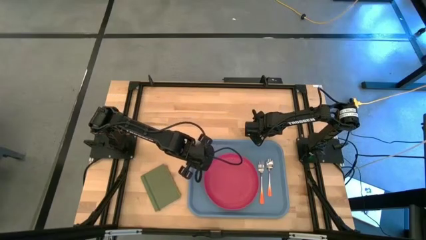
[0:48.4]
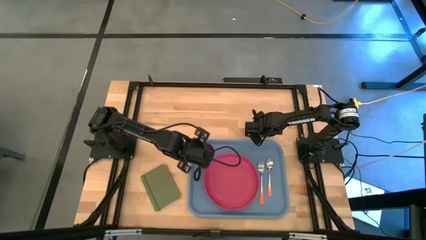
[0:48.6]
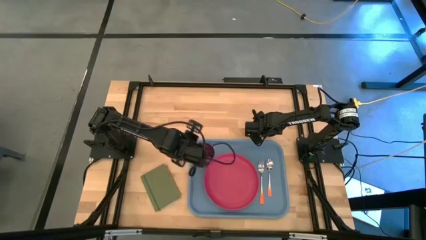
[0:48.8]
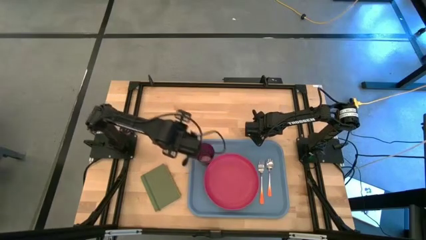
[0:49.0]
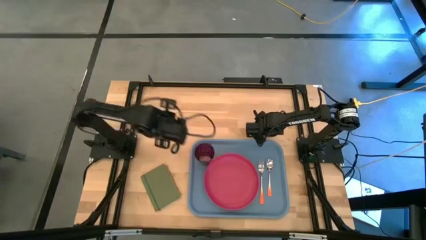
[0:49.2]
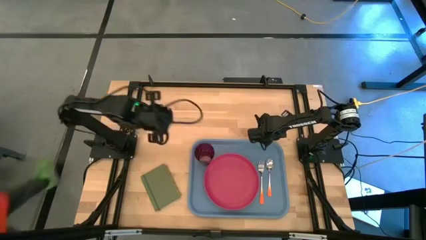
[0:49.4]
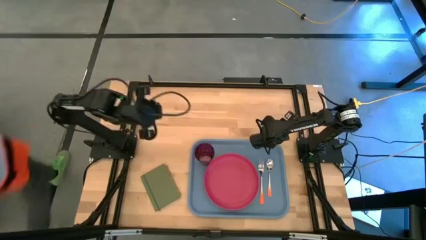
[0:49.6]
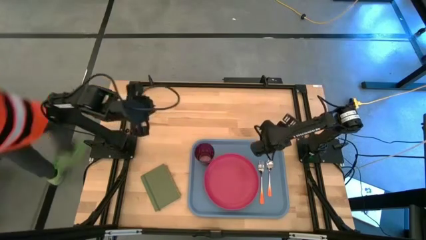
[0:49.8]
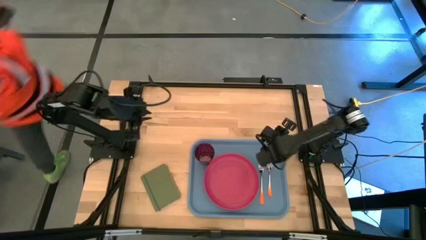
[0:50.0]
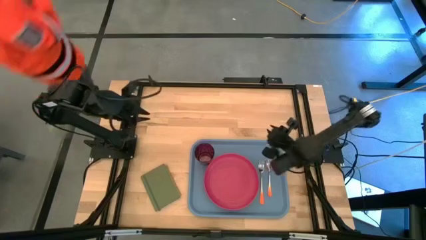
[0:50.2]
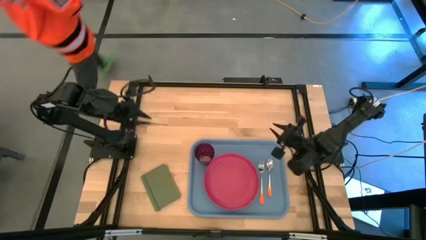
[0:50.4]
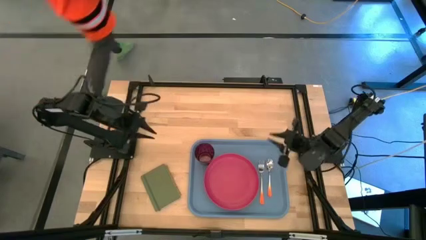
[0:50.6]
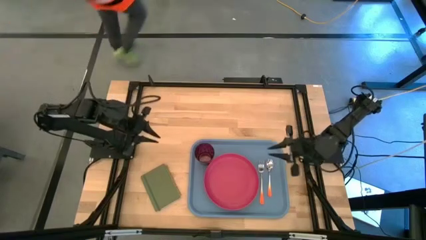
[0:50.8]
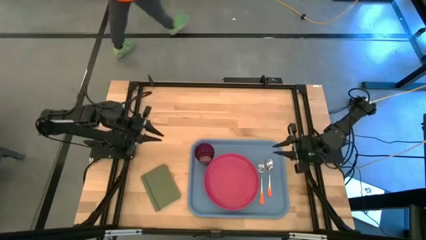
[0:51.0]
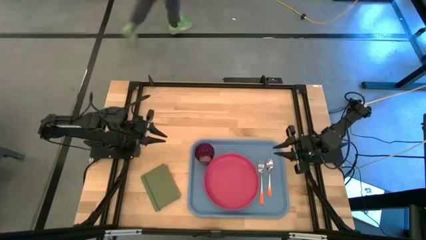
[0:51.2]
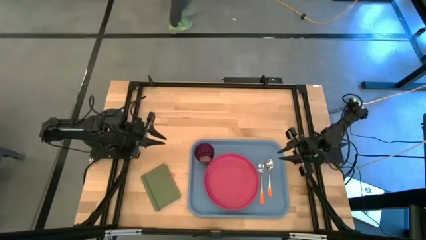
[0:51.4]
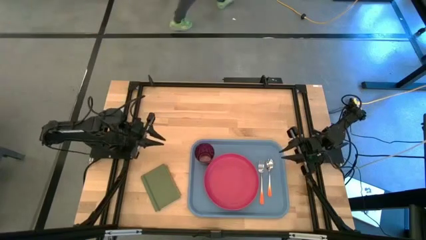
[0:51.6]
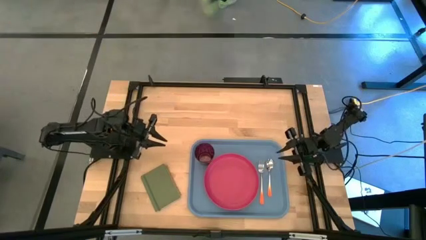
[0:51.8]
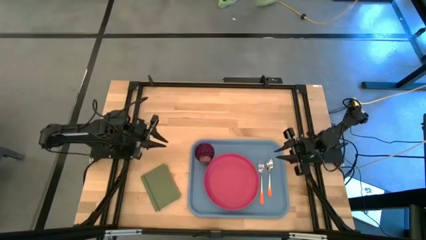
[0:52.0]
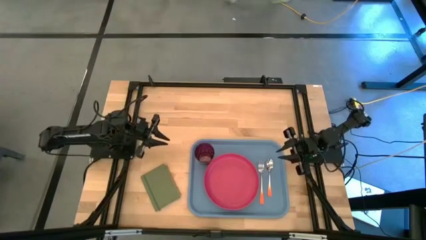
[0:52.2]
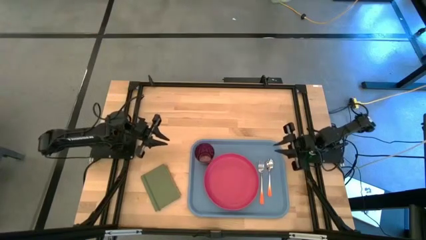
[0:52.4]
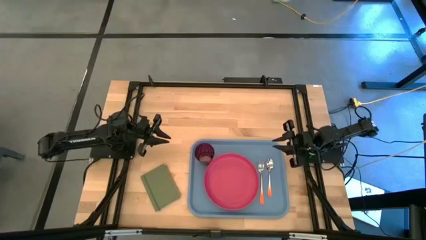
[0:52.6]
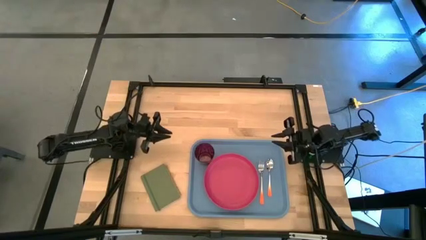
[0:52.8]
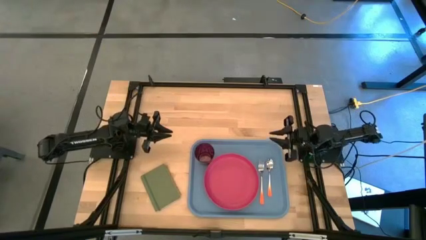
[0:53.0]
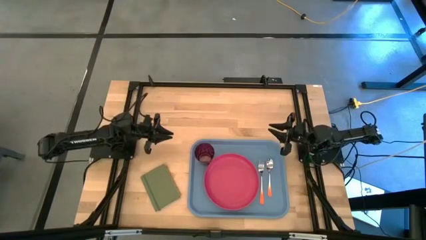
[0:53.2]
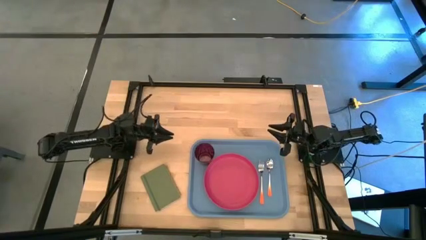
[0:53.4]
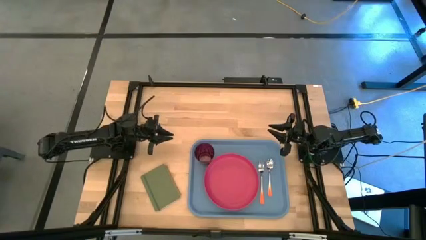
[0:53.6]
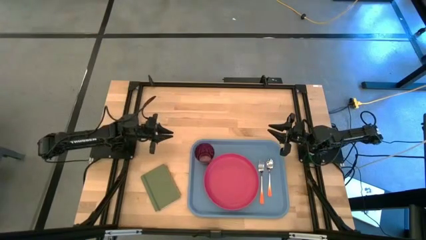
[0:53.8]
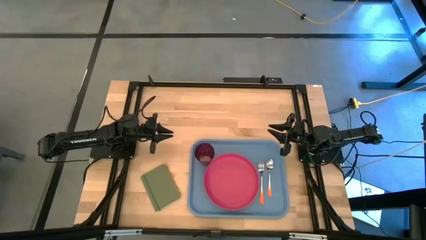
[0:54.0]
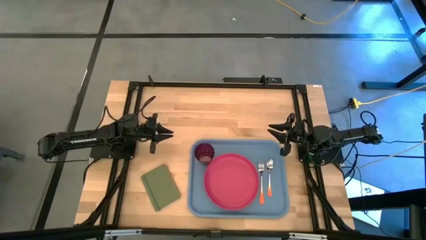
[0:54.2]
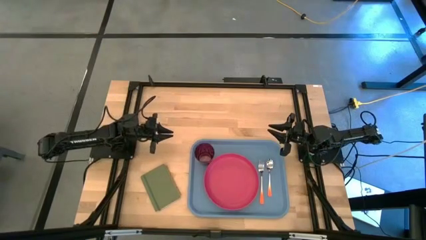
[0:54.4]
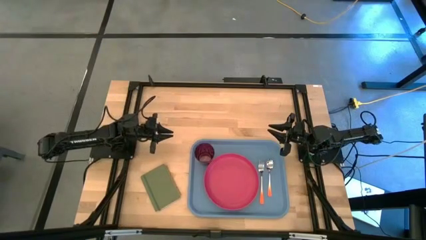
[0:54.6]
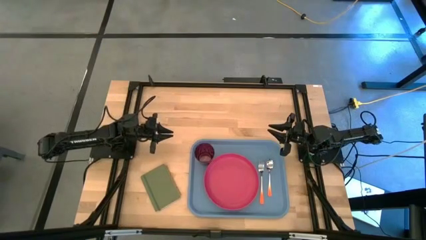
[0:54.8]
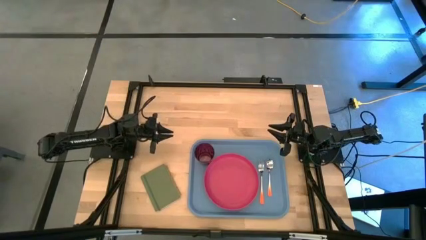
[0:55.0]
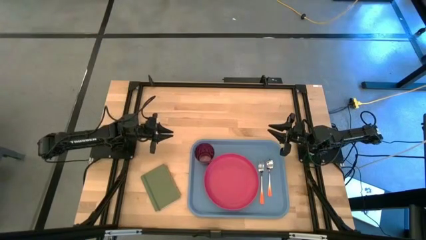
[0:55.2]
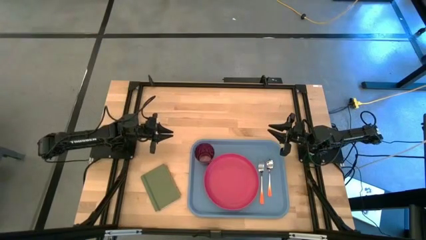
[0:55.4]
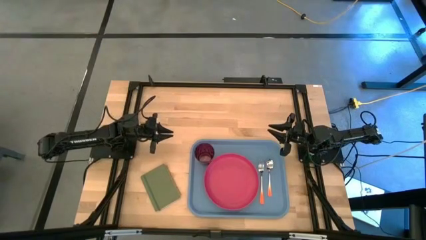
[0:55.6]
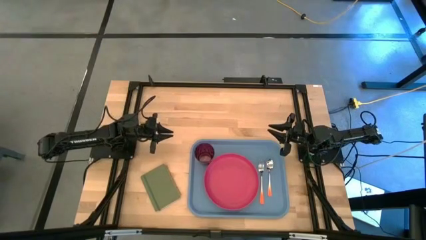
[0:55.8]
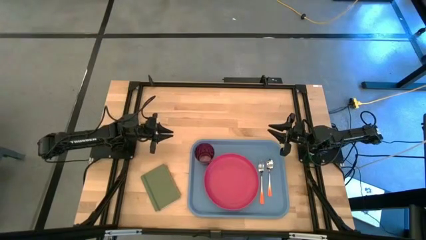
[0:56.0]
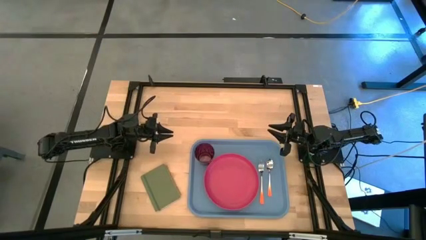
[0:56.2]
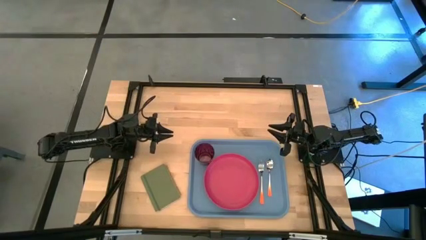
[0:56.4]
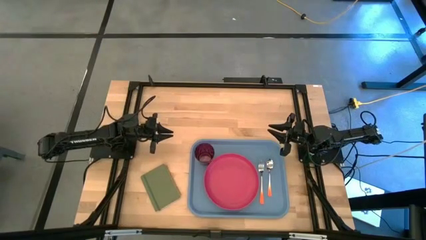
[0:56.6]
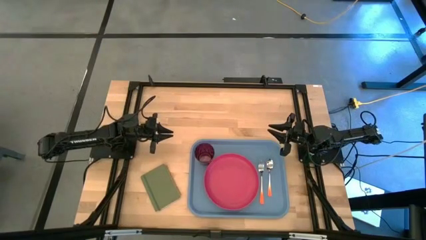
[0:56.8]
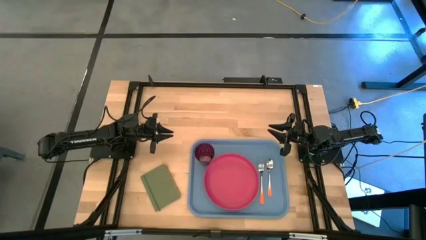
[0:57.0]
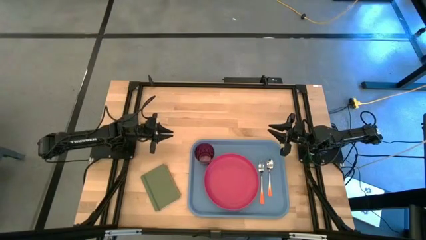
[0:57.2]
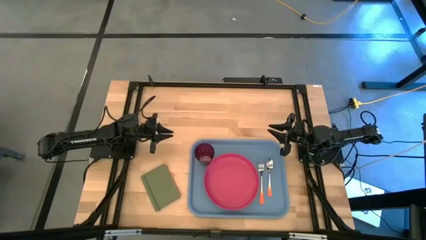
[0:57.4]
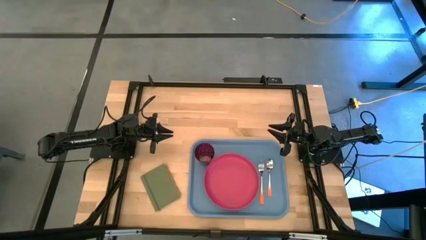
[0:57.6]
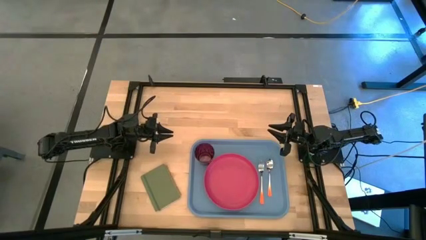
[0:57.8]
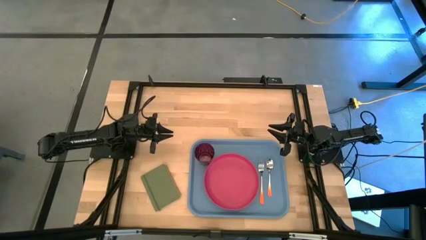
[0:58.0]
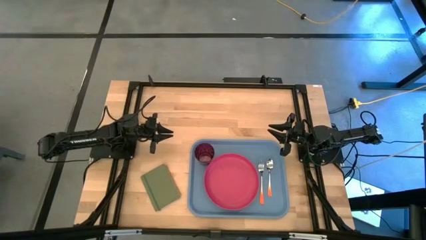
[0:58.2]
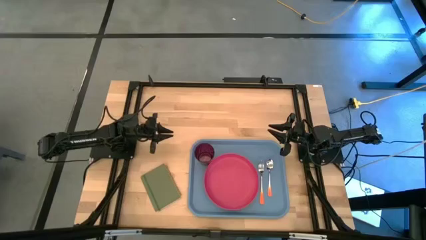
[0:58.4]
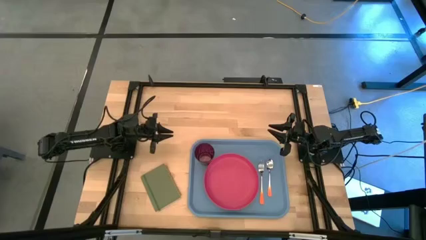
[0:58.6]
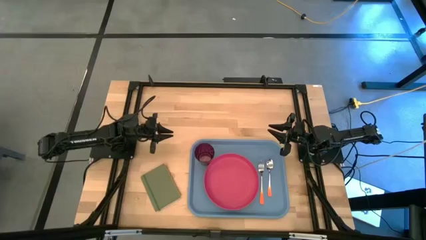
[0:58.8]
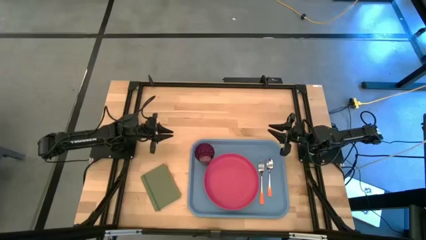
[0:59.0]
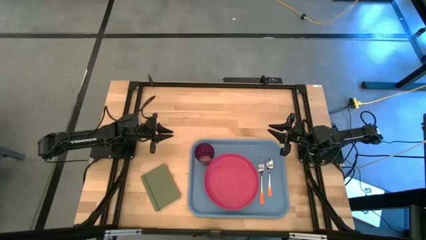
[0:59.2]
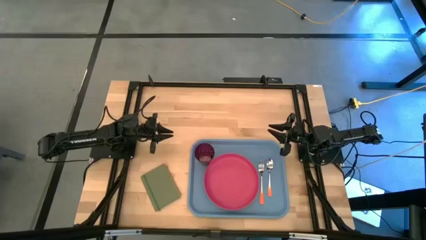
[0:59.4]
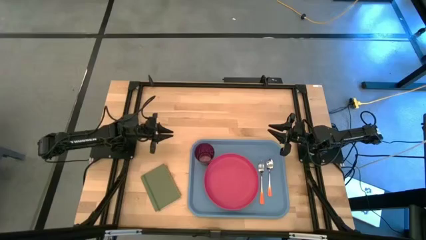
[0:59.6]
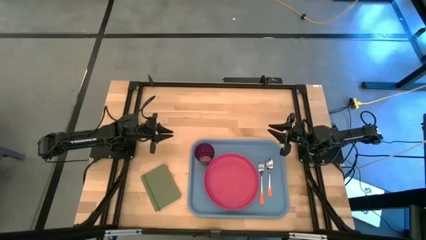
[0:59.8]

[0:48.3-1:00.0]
Task: Pick and place plate/cup/fork/spoon on tray
Return to Home Position

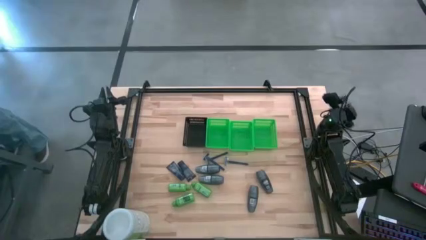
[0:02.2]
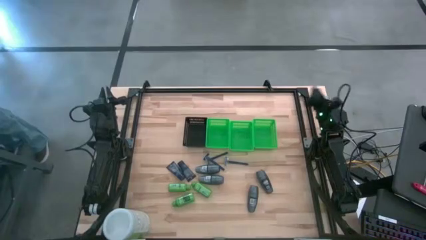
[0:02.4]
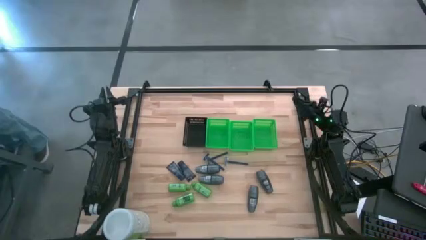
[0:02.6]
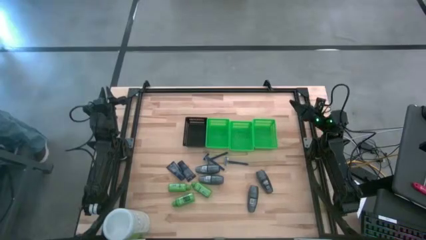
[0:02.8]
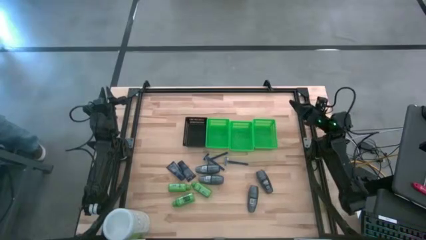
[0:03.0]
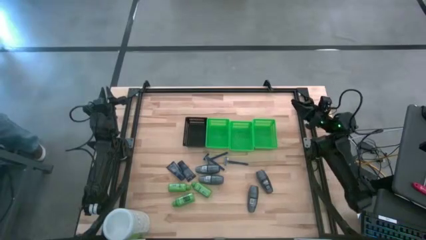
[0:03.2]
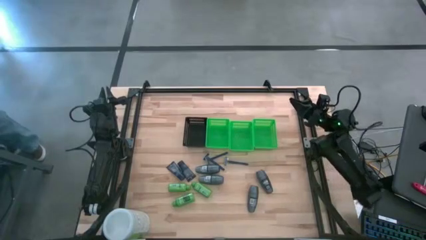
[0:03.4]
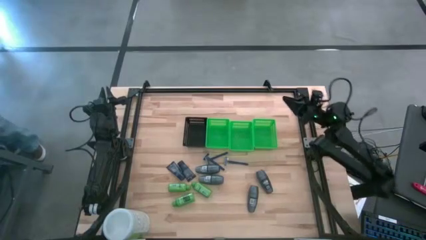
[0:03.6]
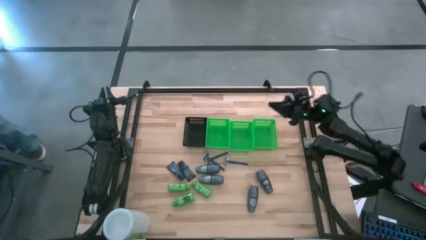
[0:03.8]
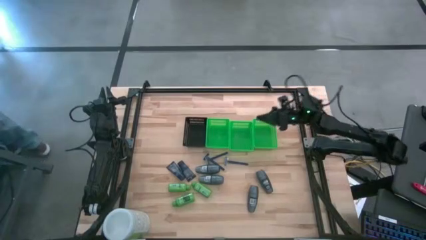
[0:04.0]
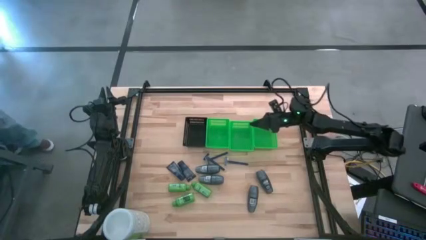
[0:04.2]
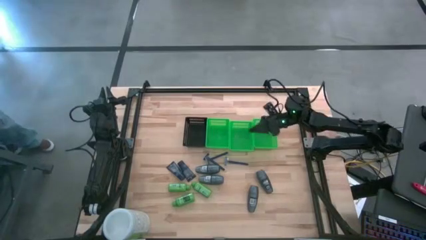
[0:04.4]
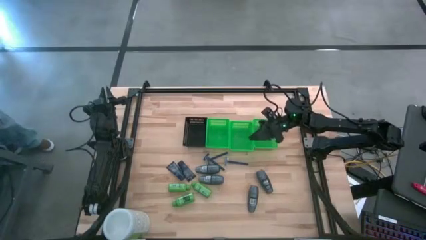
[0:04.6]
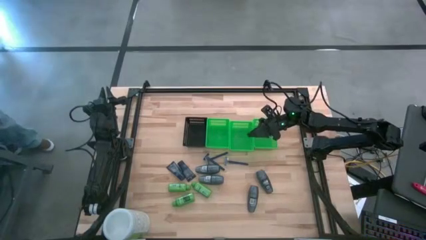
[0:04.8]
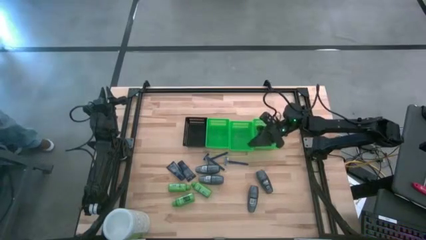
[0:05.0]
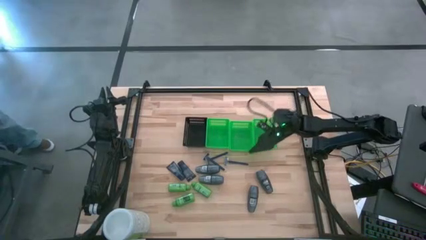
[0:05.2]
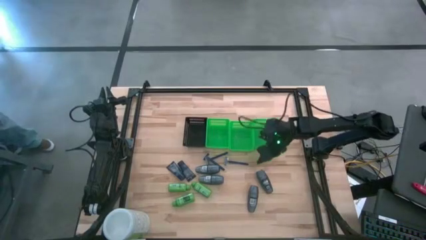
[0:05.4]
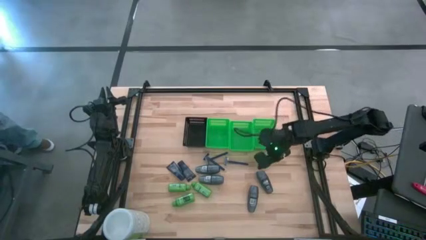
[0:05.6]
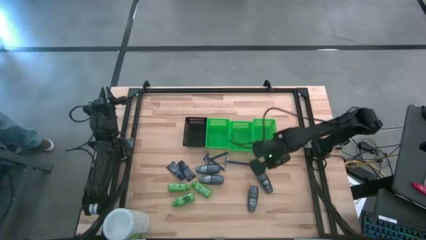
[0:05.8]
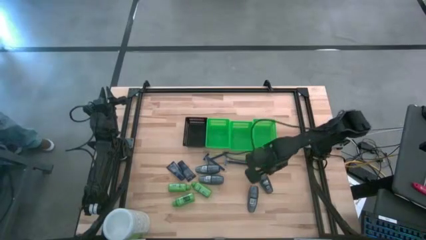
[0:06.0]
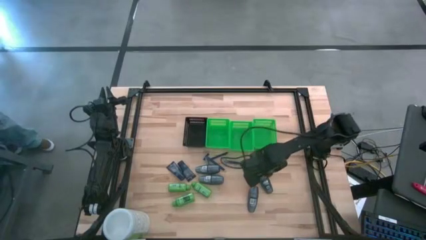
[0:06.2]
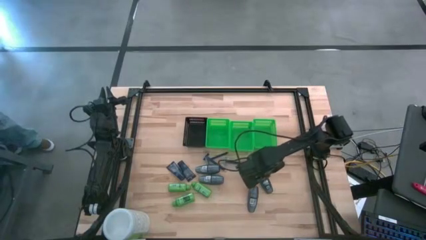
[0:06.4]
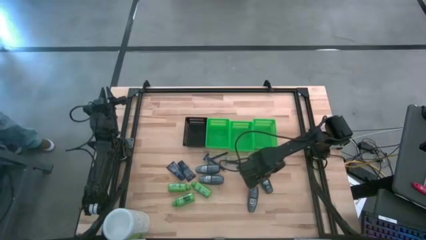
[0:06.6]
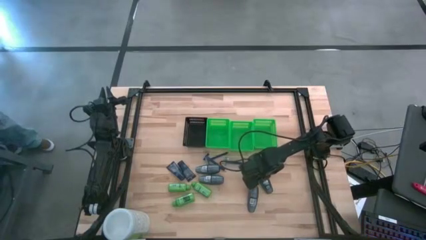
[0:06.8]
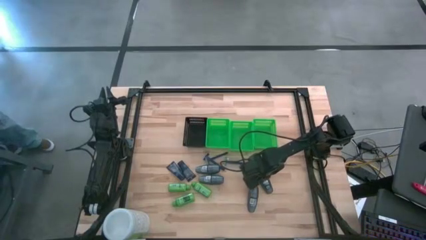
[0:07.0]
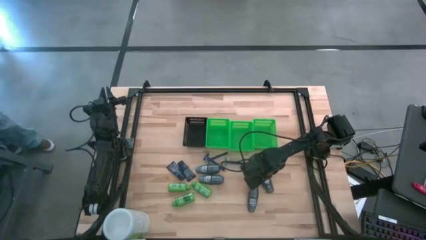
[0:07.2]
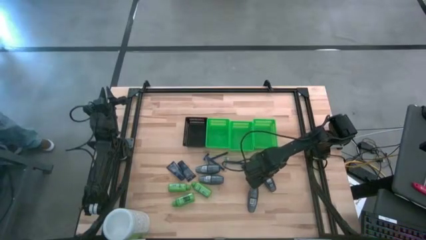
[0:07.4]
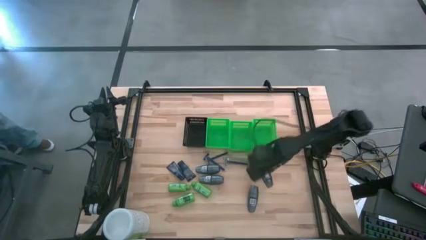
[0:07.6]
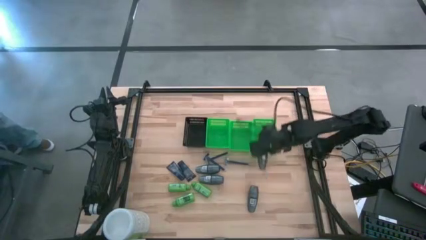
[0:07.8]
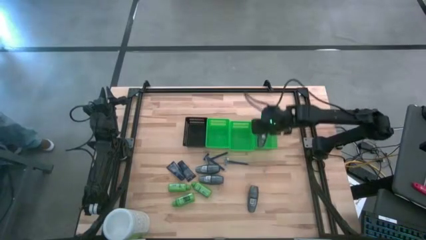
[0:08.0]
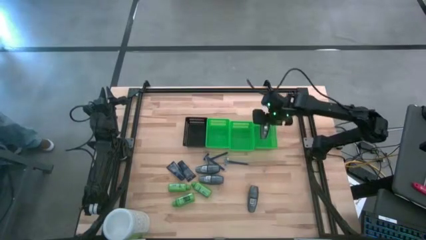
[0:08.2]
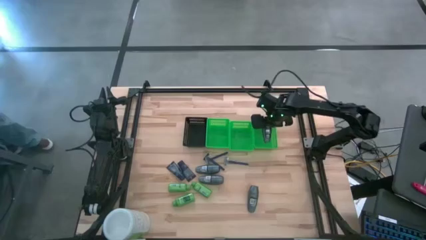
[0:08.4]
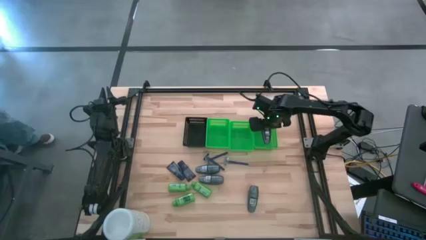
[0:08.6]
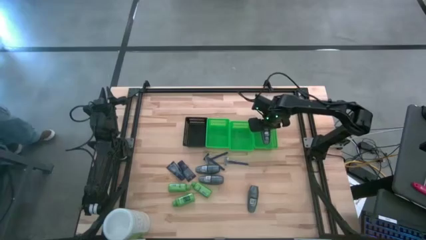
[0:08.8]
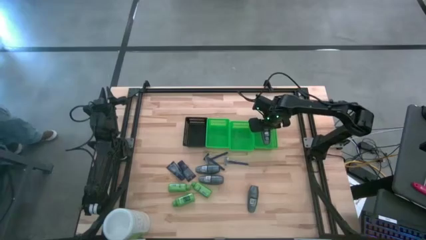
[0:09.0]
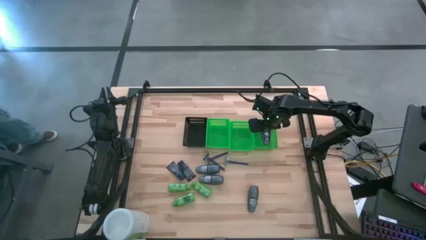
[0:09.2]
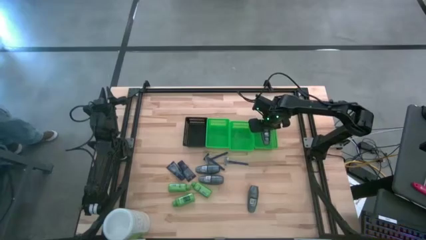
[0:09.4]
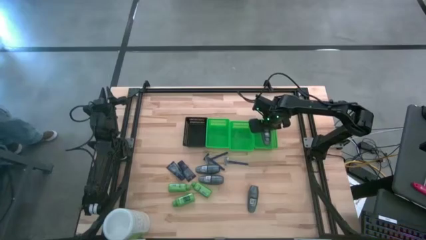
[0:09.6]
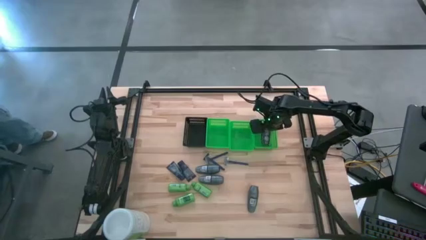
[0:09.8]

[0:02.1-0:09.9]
Task: Pick & Place Travel size toiletries
Put the gray deodorant into the right green basket
